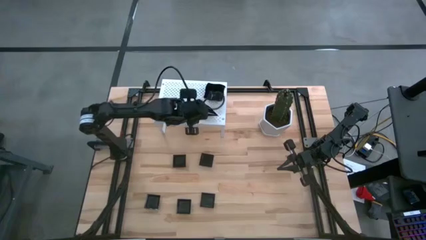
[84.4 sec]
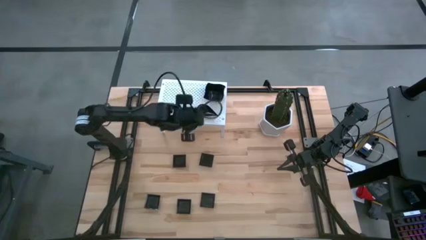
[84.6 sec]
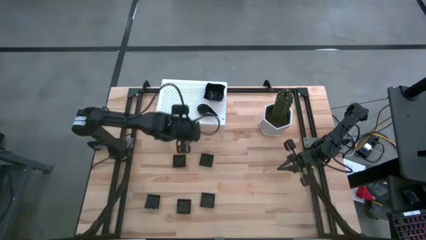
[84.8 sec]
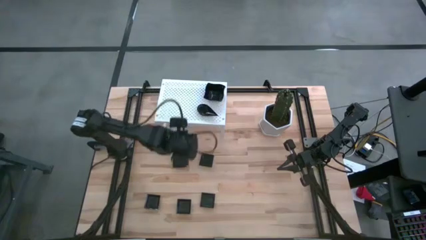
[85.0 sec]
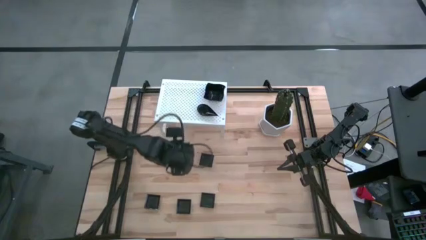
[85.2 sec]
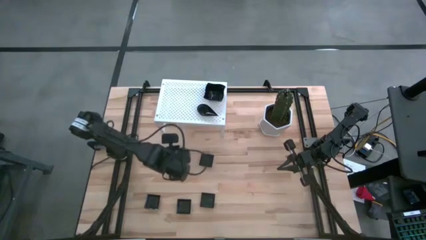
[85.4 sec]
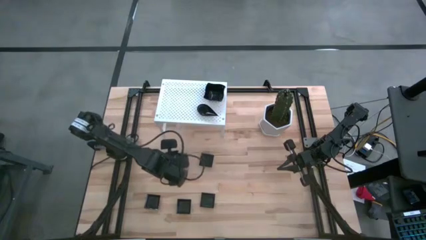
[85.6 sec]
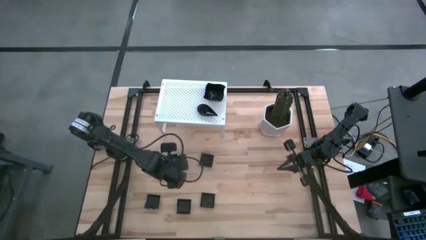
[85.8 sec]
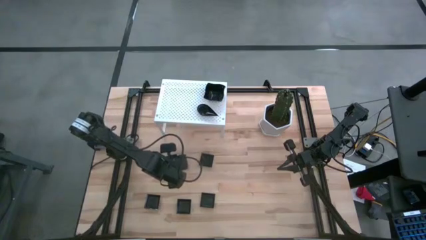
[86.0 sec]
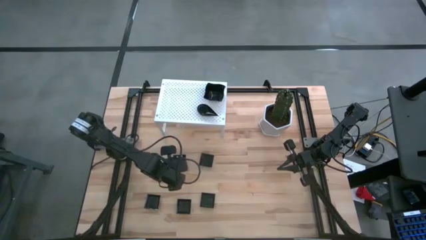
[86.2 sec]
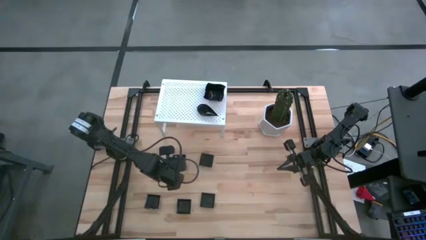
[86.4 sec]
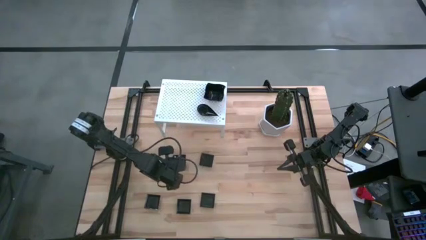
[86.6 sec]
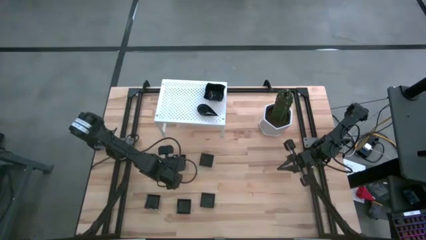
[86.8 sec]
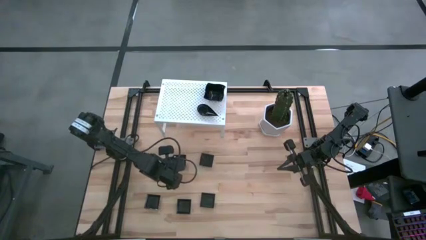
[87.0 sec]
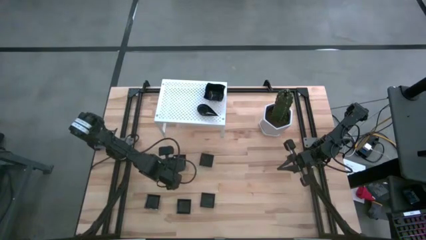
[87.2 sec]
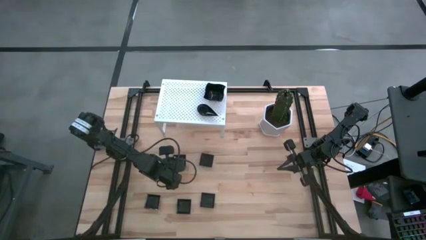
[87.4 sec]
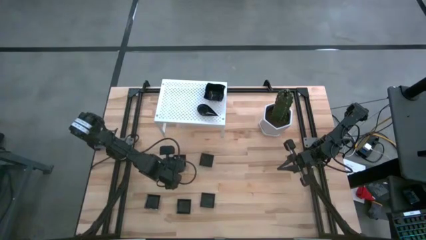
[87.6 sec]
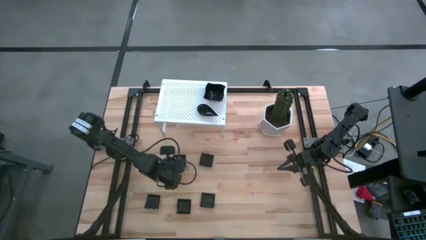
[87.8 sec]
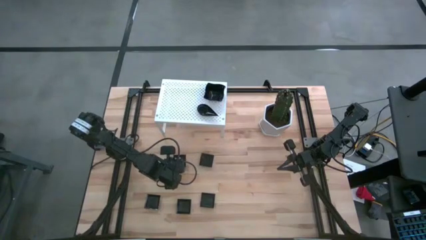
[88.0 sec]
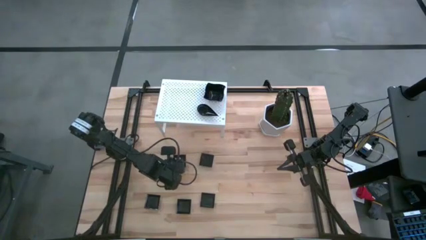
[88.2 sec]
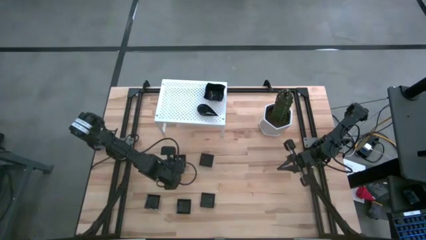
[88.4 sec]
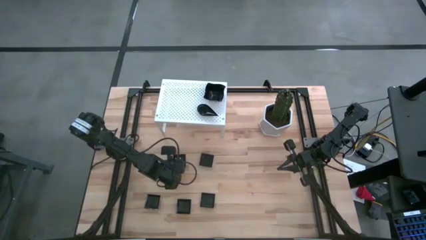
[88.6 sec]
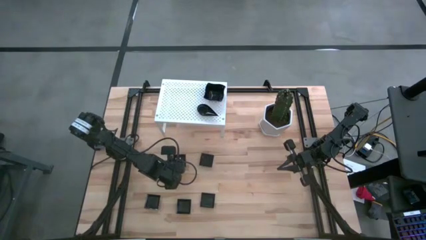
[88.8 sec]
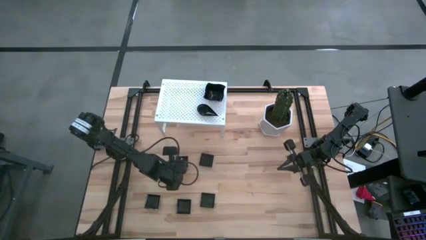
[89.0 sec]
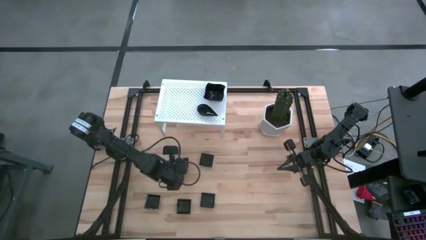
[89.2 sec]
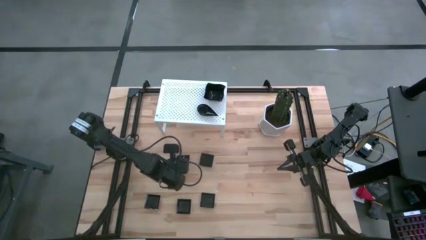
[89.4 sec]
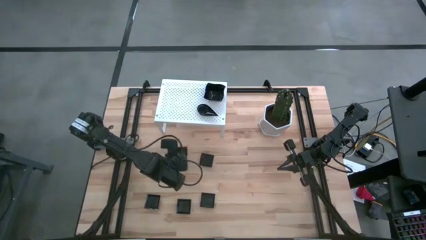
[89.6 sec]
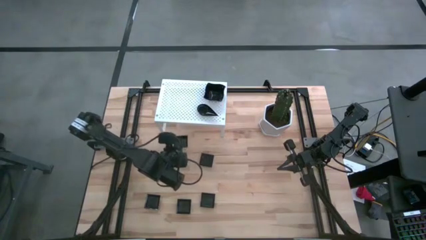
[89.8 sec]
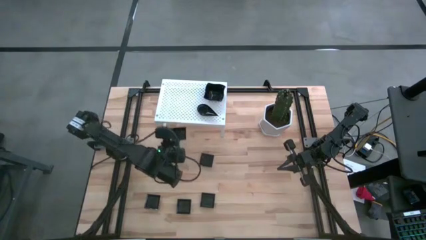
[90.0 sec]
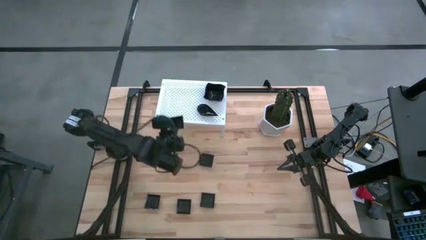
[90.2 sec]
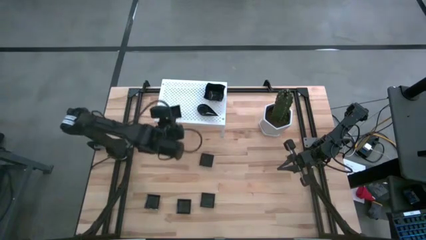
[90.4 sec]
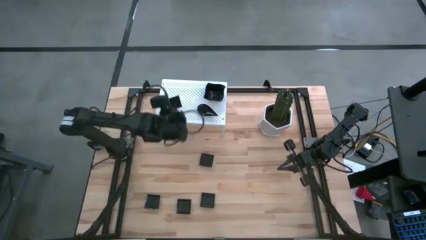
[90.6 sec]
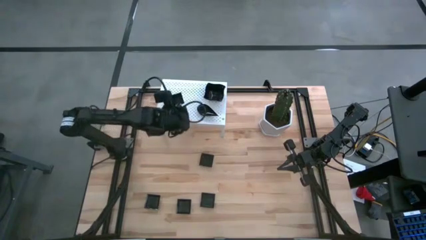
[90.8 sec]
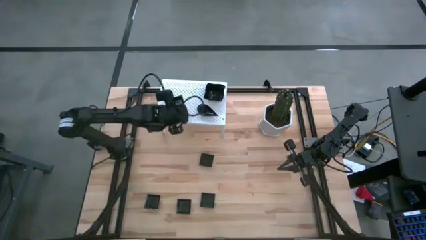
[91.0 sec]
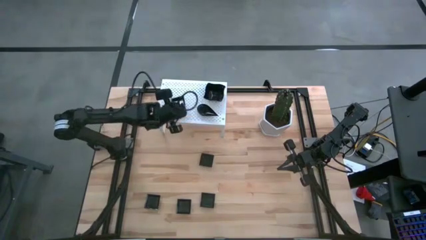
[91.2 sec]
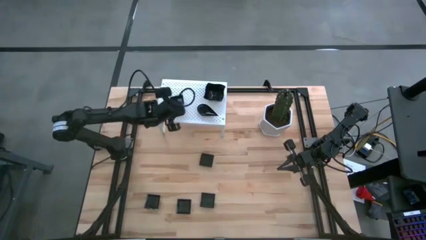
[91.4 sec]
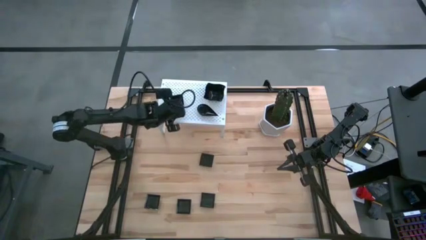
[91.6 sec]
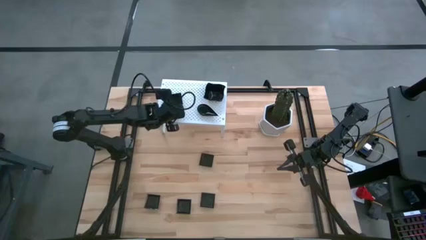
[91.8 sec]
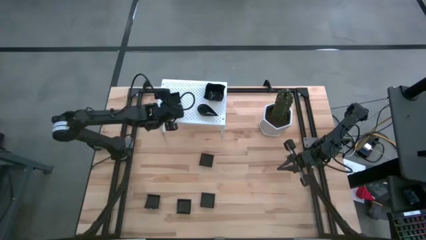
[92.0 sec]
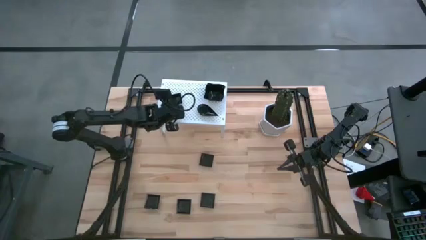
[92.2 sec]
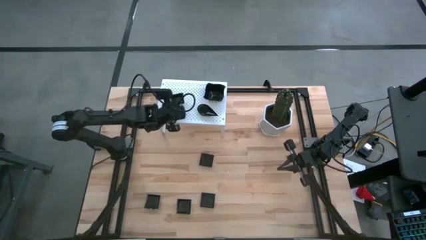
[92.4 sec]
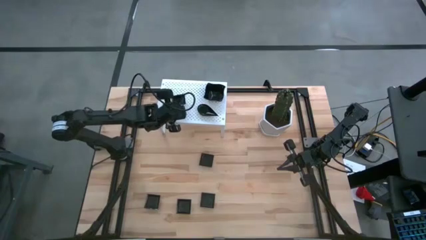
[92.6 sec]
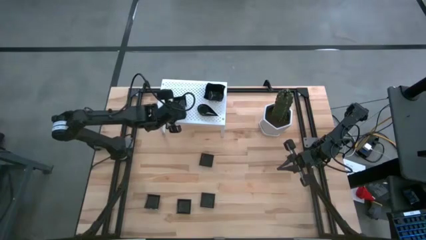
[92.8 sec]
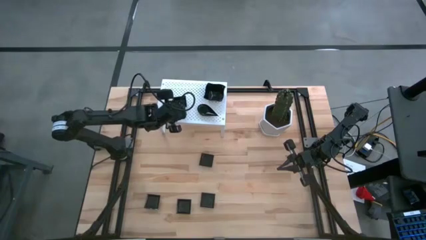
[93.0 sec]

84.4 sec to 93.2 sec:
Task: Pick & Place Mini shaped plates
Put the square plate on the shelf

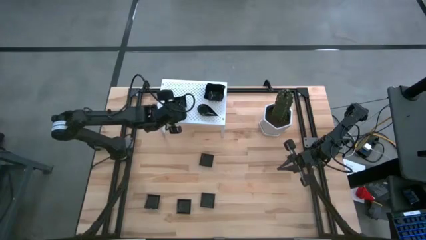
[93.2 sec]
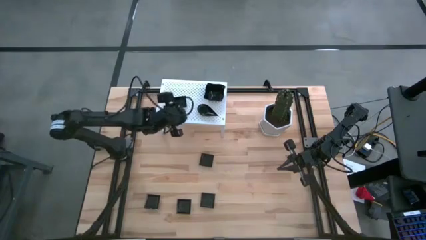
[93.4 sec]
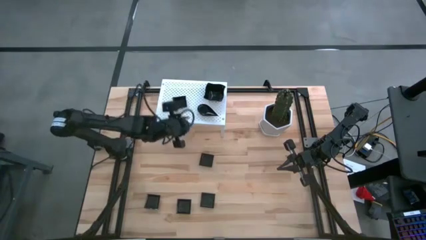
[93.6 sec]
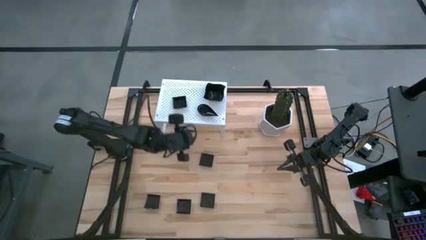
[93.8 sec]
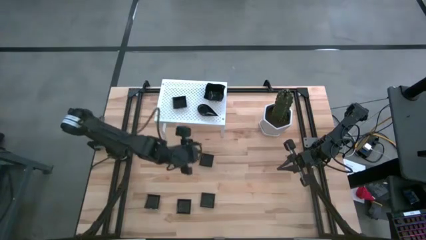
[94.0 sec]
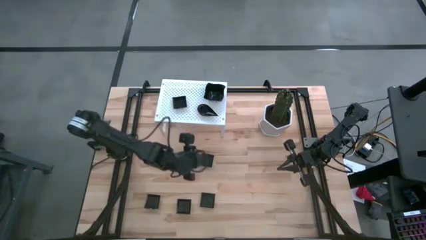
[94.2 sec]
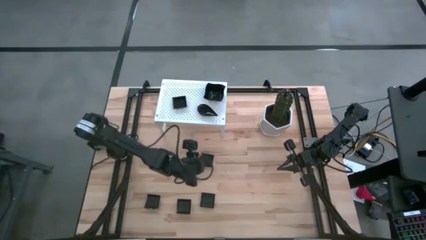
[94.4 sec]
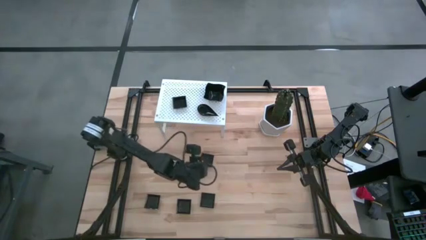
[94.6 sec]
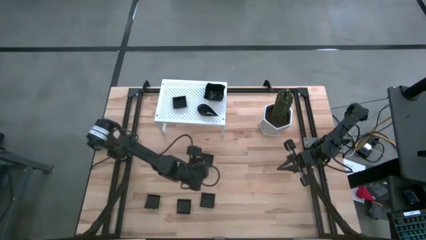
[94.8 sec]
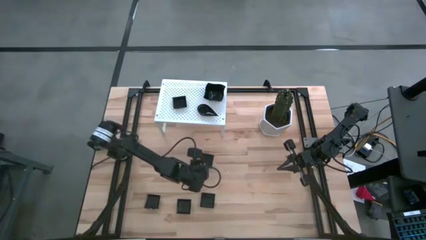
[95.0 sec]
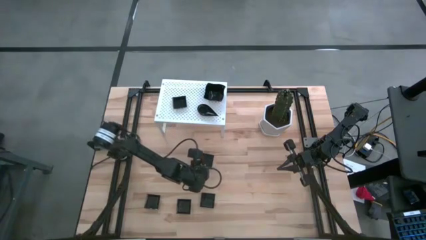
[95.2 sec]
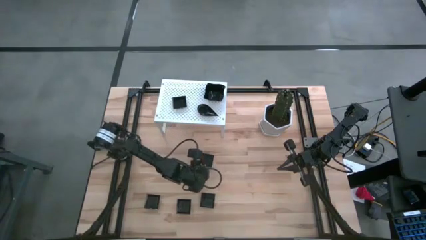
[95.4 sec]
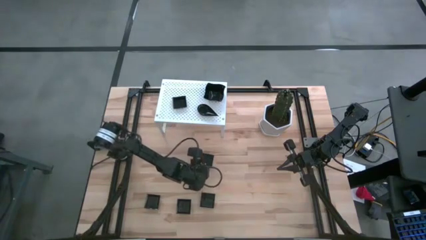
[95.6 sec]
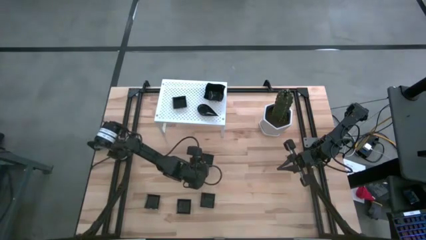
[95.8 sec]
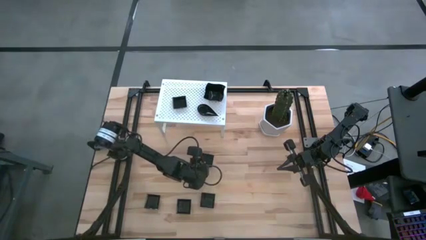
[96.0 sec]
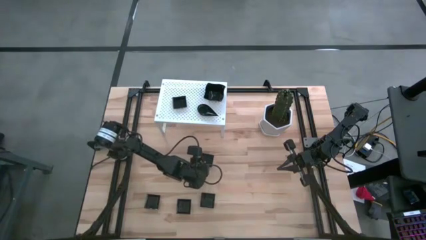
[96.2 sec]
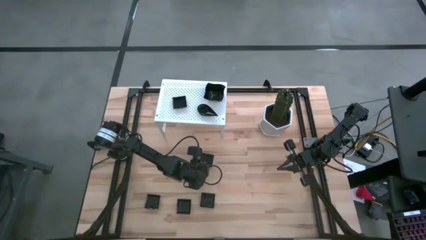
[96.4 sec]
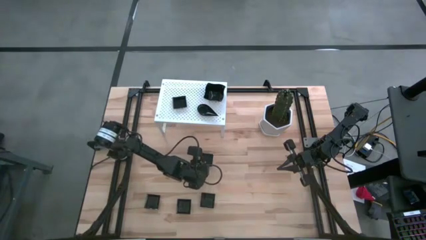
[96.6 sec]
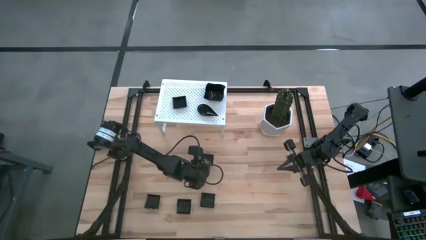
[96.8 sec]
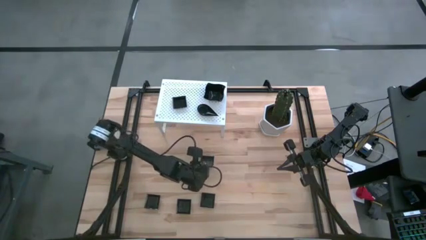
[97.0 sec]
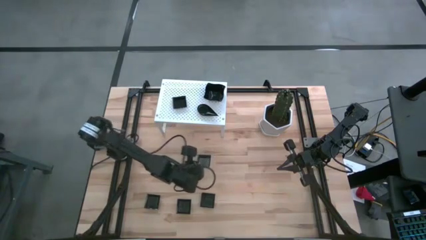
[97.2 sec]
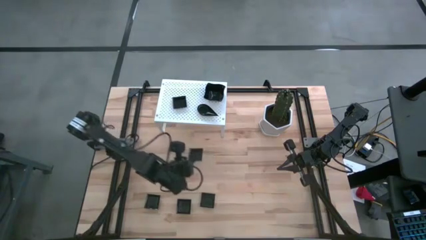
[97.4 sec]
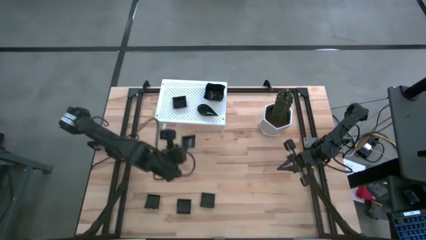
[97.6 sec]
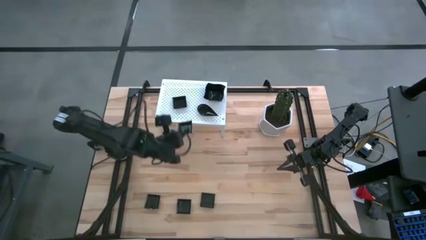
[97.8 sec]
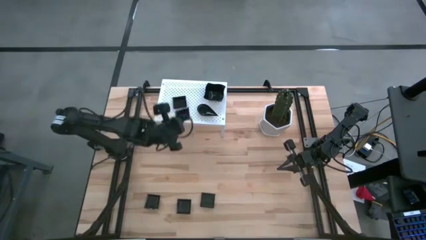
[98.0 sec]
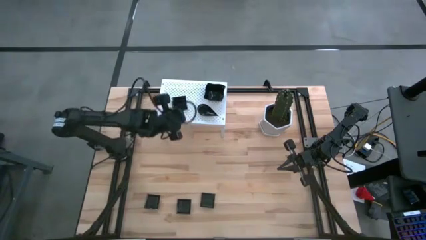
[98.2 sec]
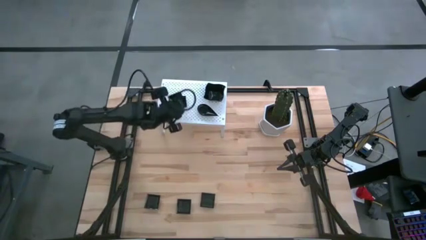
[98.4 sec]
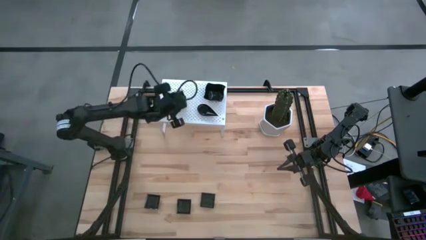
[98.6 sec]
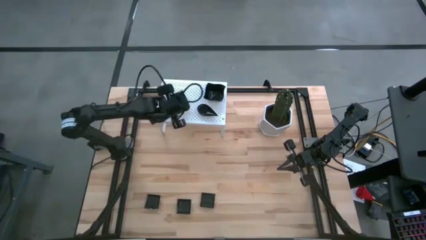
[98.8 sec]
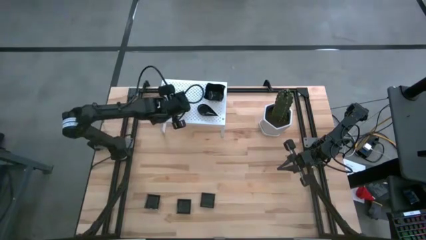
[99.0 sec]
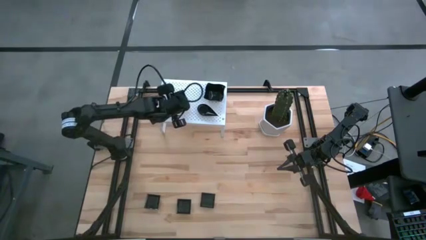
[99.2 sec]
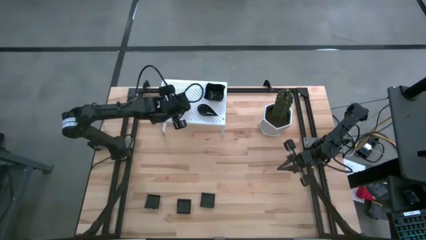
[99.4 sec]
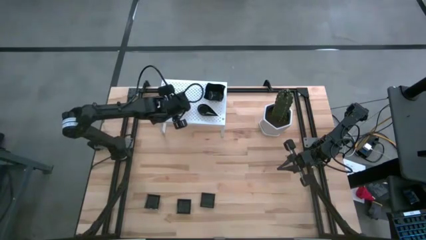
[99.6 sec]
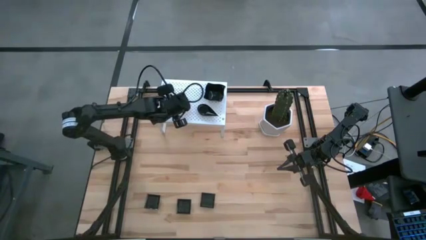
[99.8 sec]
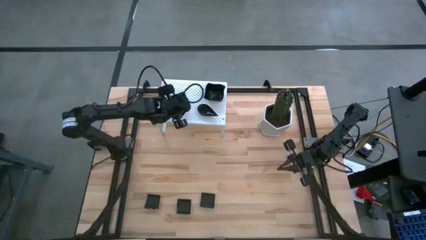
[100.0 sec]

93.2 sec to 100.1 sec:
Stack the square plate on top of the other square plate on the shelf
